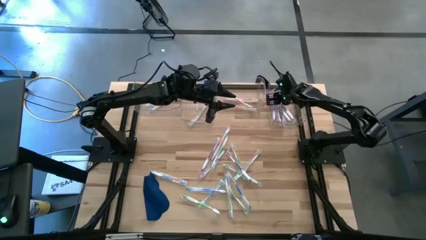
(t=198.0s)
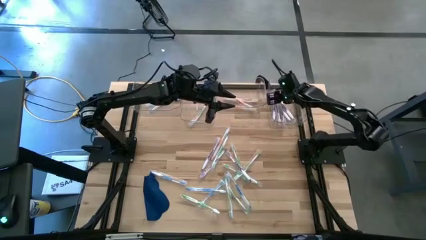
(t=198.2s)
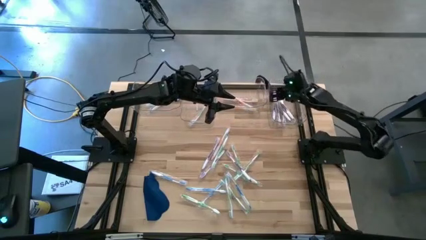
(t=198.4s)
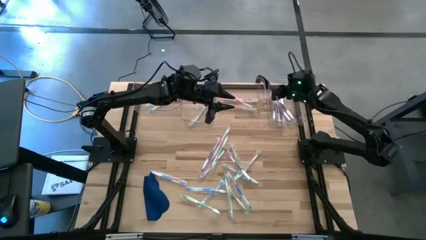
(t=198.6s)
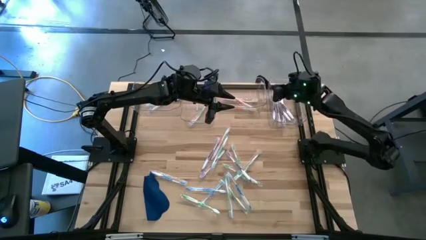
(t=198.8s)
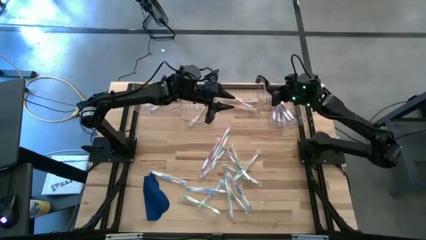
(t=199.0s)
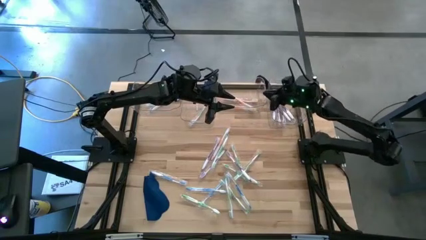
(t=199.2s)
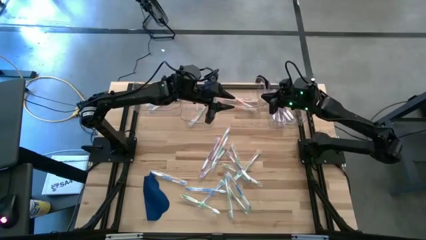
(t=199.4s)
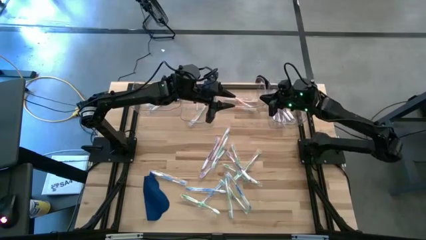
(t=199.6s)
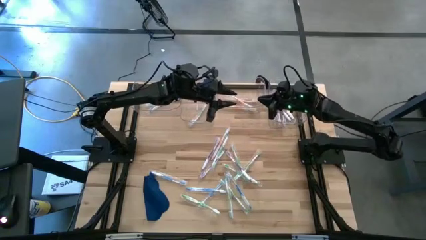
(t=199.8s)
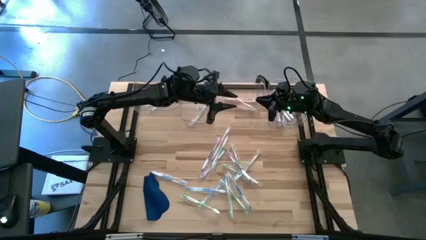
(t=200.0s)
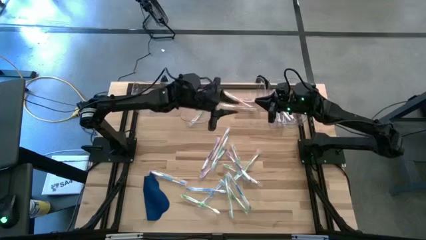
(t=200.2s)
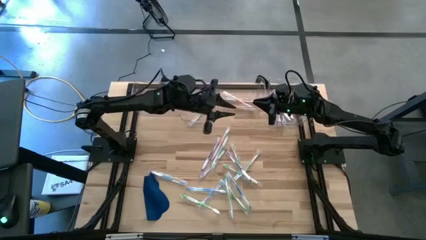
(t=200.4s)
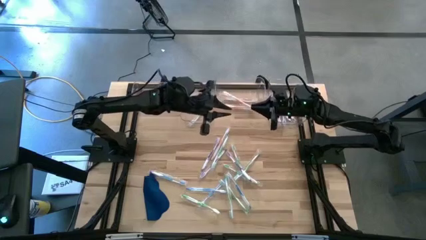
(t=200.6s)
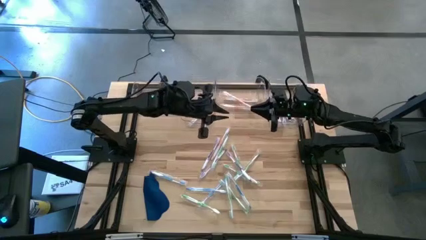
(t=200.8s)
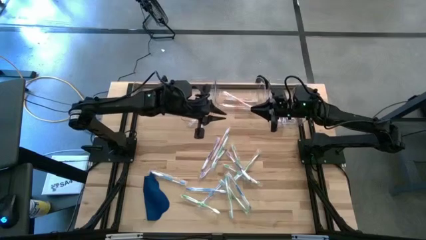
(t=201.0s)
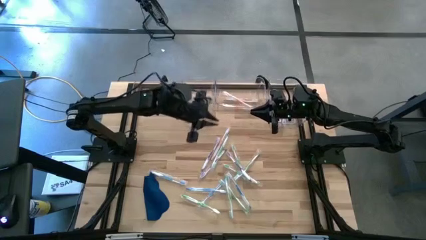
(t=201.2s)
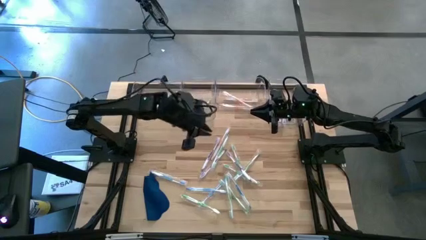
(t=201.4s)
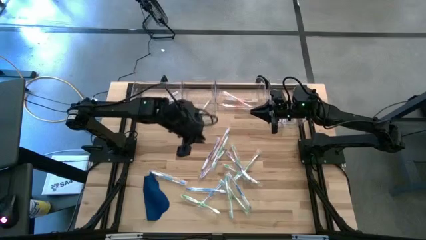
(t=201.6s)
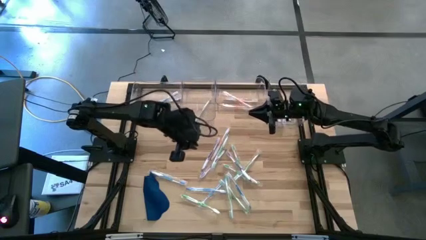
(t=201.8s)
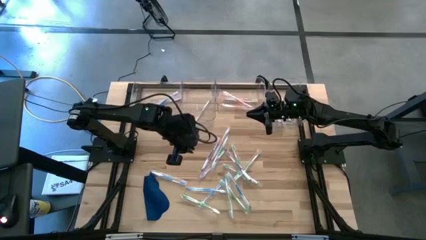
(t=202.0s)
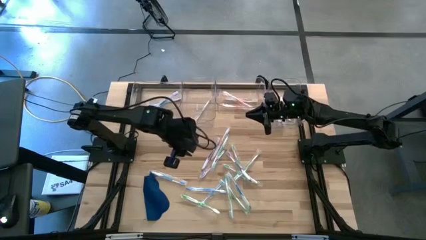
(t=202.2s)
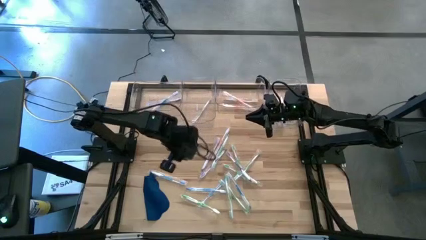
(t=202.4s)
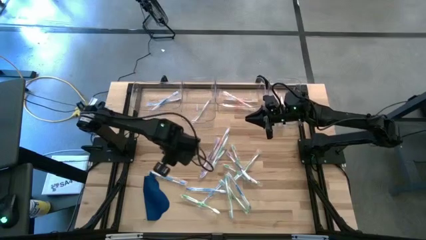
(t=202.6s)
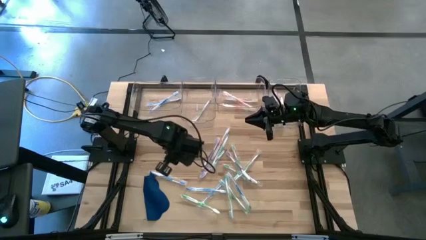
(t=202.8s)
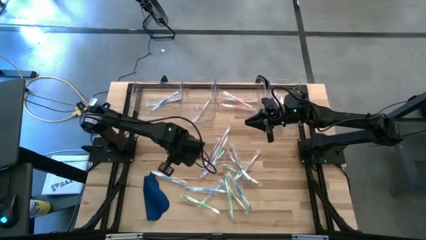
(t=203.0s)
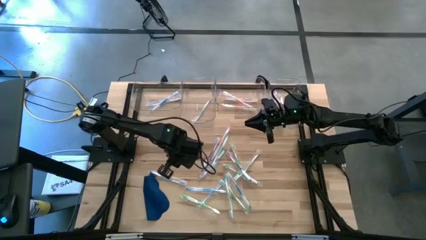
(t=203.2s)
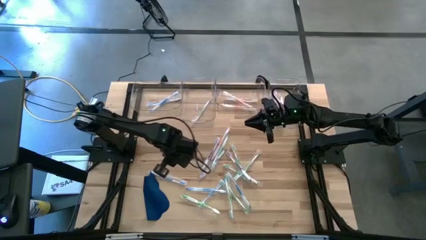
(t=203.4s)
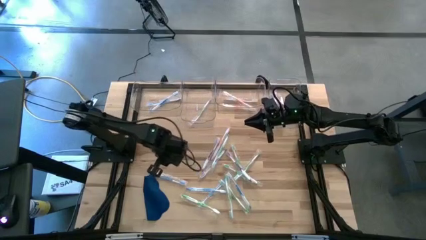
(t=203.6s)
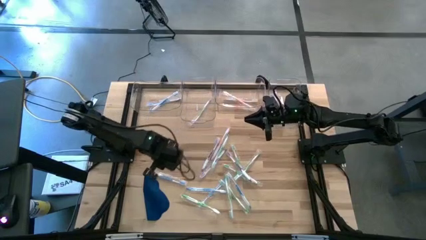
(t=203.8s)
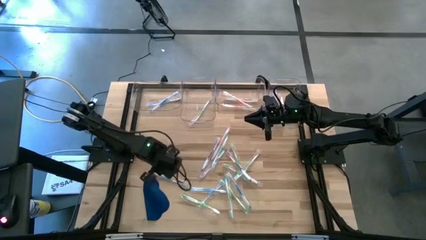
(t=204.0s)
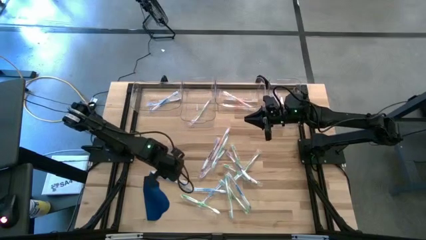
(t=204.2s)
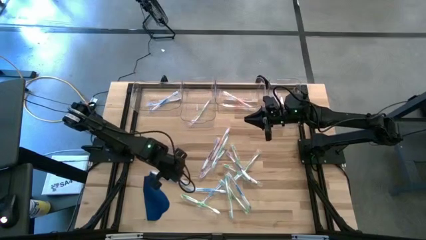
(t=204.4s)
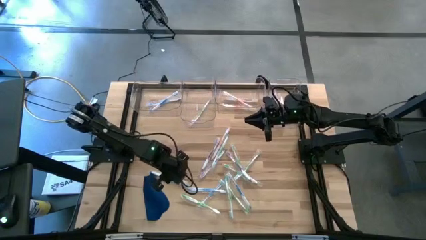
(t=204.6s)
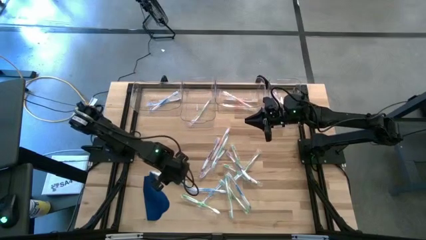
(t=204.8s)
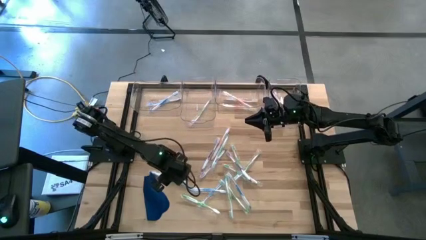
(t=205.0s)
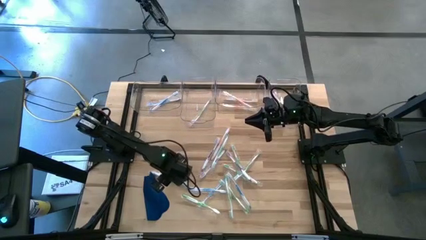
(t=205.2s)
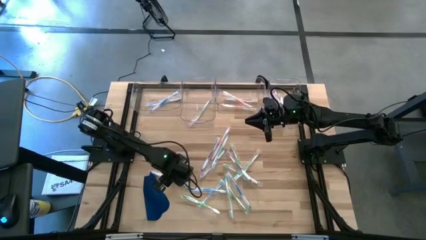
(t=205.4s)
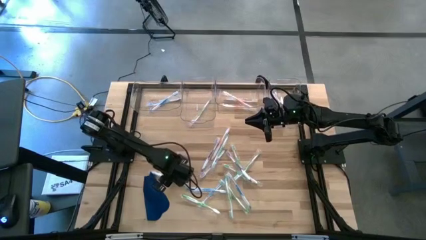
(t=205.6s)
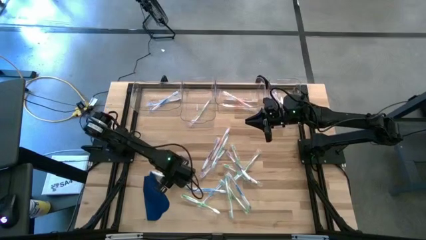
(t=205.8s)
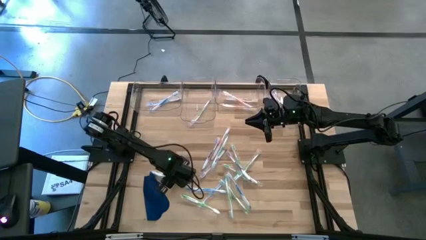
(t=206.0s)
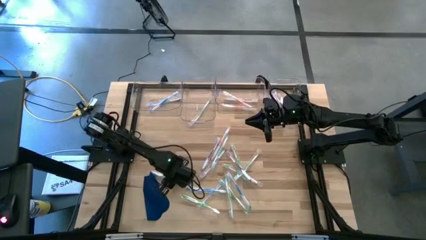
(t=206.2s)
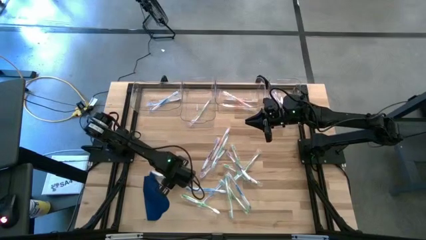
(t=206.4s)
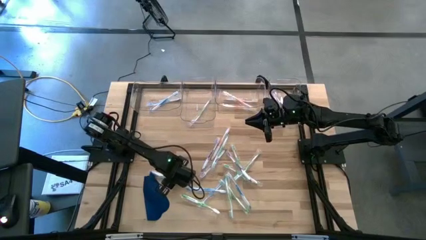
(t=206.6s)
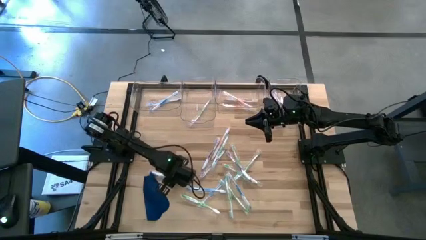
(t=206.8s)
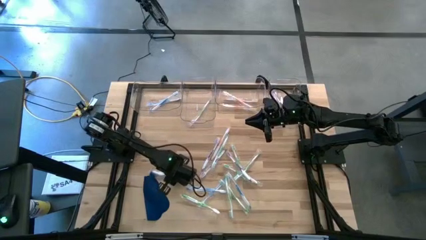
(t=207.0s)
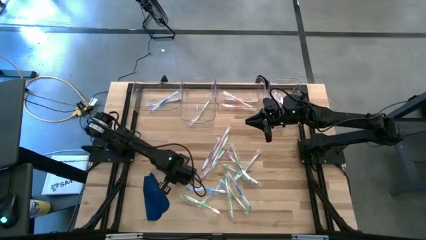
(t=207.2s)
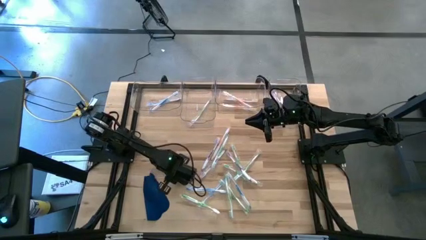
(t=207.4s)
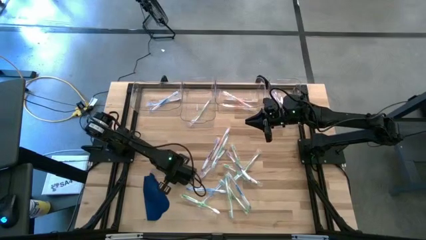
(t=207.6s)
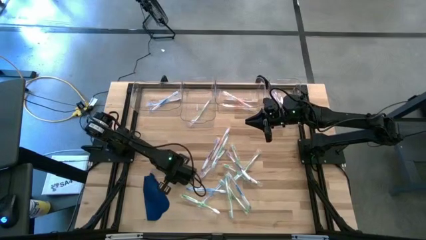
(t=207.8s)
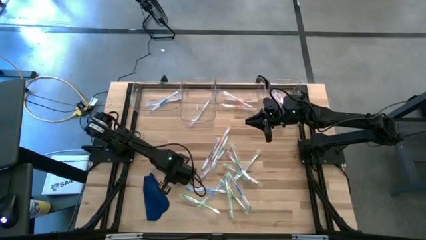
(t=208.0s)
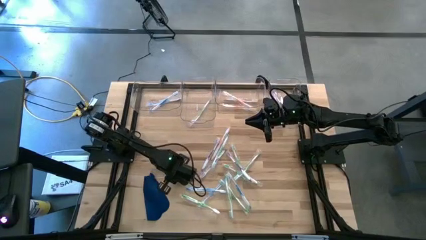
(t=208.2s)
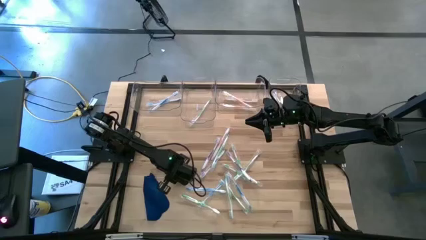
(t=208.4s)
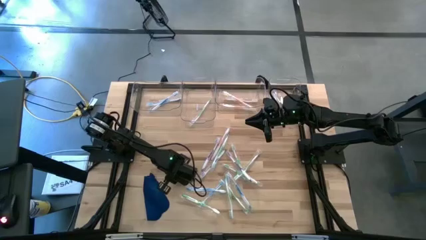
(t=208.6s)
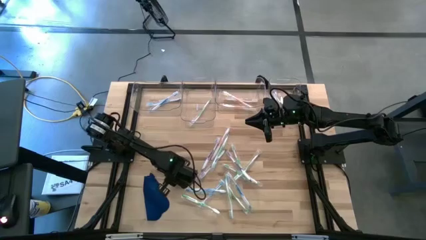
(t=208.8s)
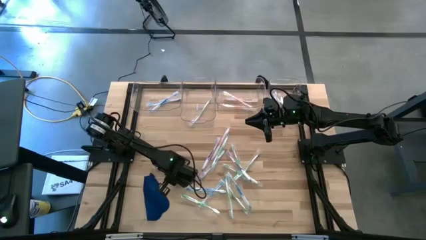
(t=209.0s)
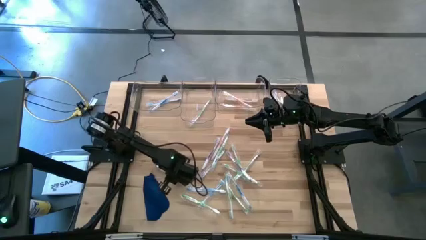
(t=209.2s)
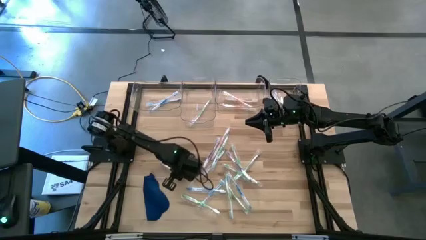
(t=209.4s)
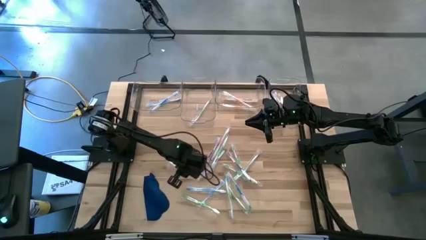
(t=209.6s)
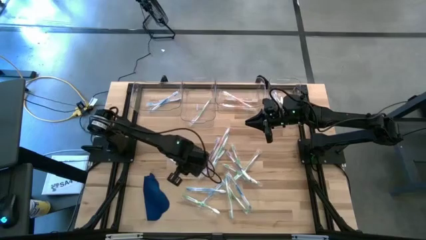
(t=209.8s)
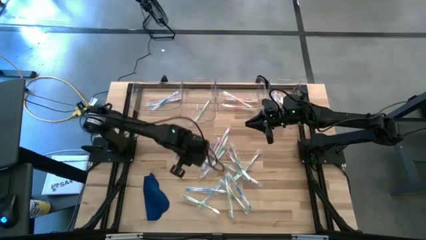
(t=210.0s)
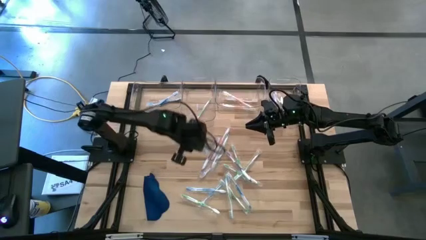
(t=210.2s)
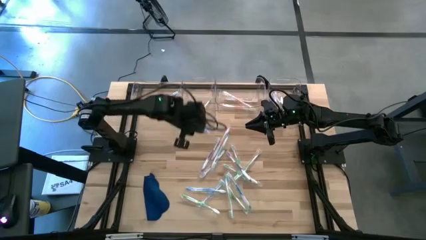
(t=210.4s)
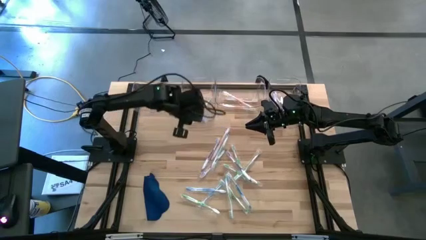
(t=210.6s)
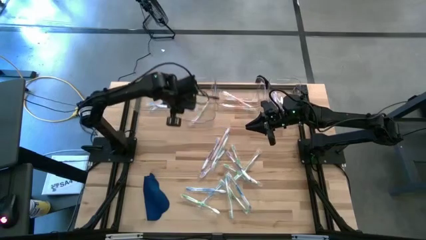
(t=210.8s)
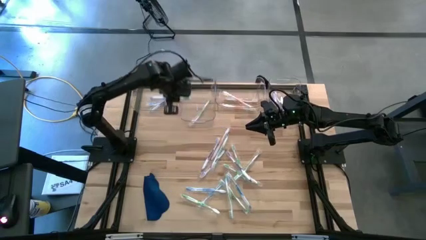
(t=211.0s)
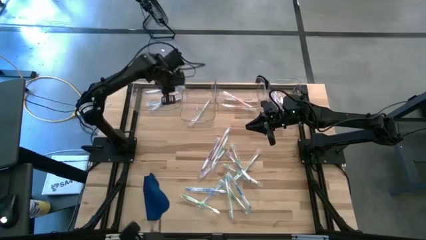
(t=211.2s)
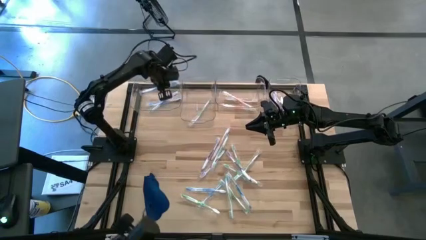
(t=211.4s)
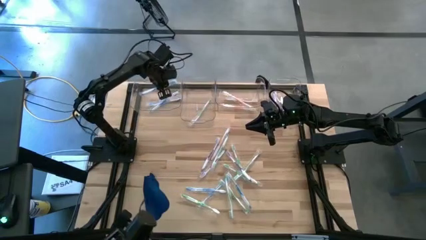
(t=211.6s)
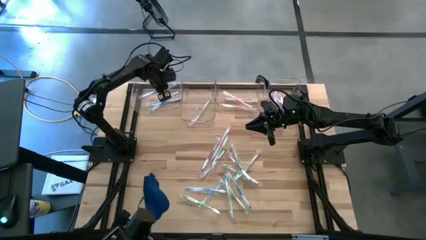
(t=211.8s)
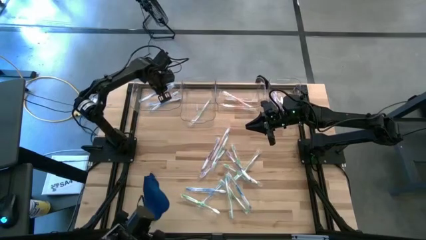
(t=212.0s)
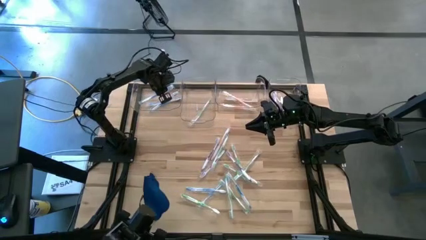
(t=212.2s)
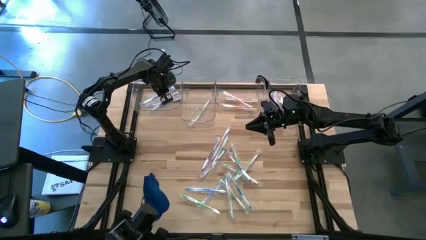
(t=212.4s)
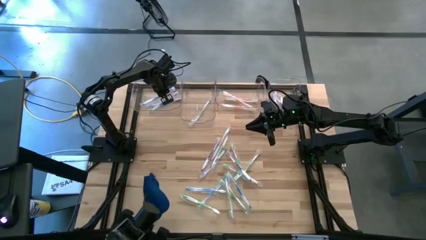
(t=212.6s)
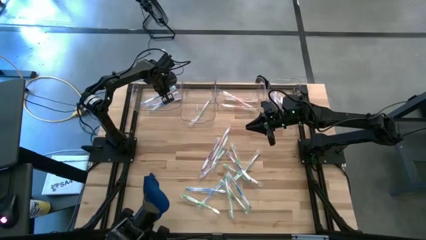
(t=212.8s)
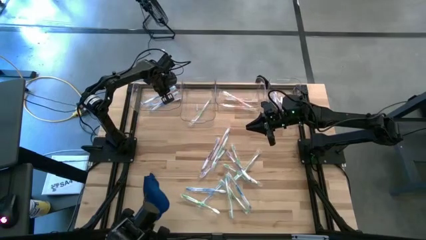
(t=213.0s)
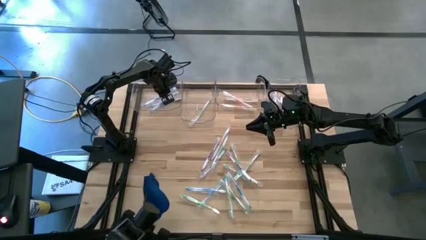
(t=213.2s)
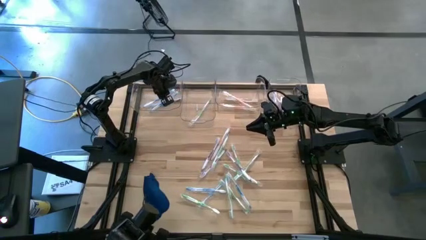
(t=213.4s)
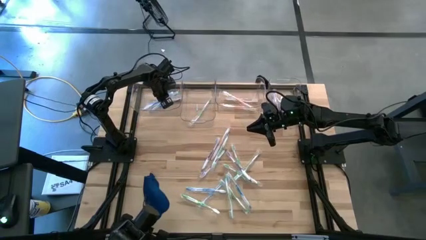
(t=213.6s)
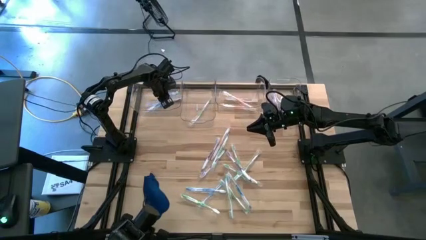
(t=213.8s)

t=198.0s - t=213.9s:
Task: Pick & Place Toothbrushes
Put the blue toothbrush into the left transparent bin
